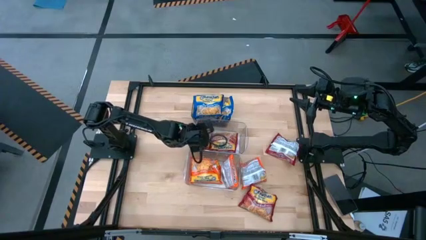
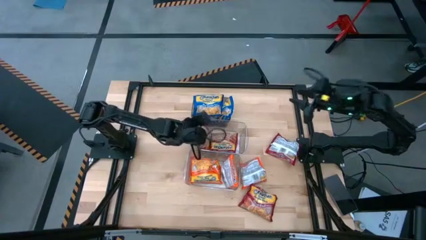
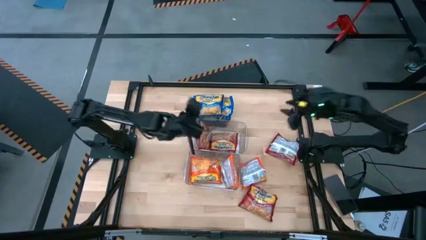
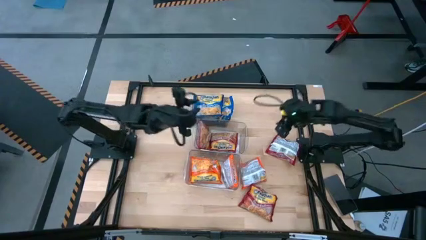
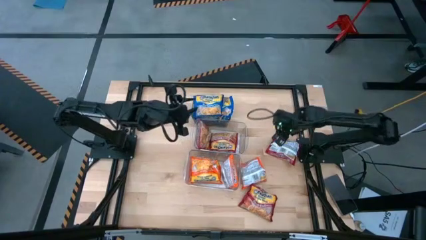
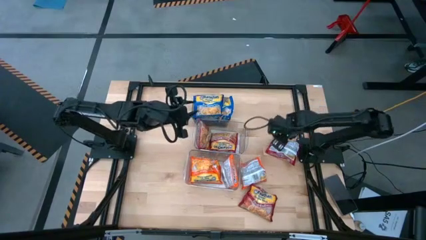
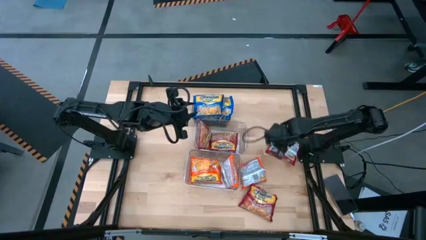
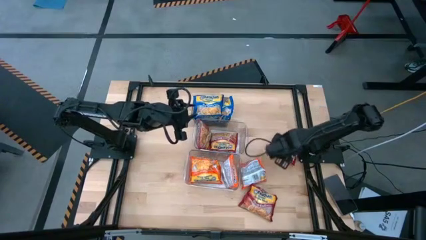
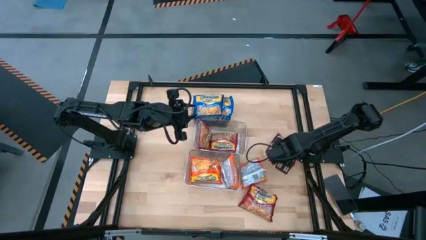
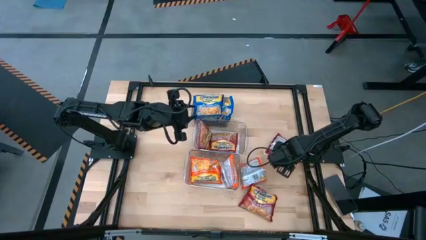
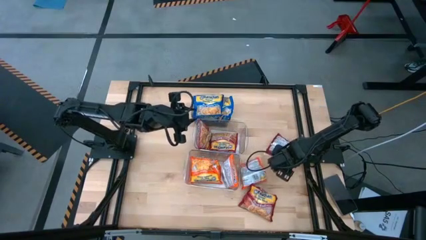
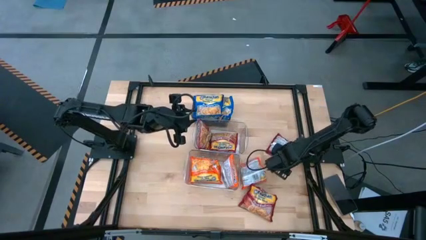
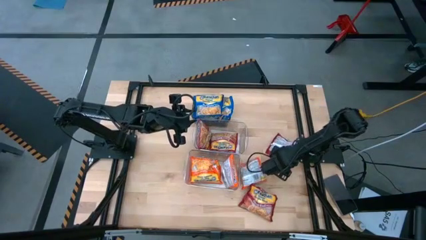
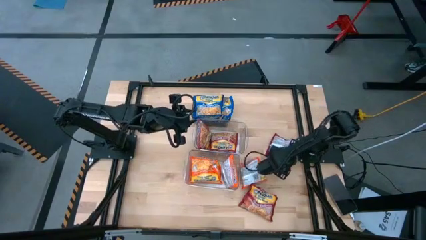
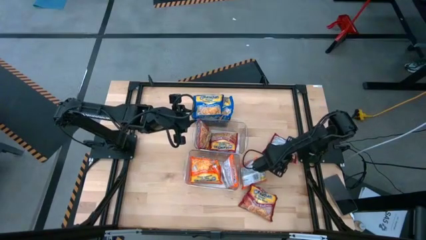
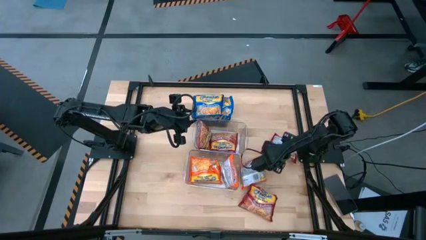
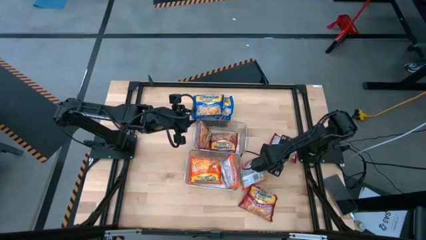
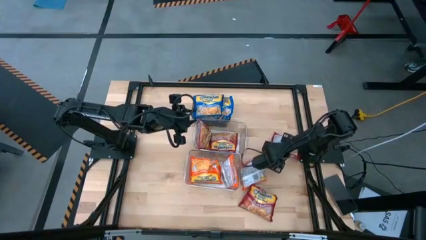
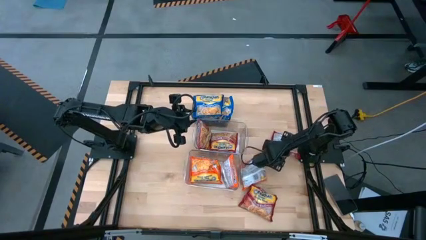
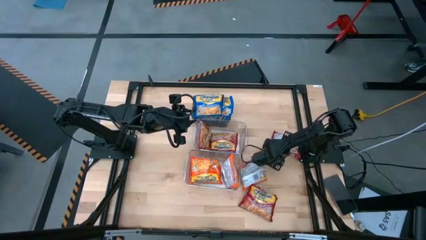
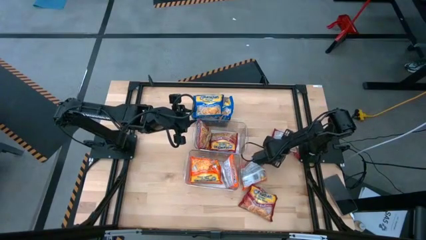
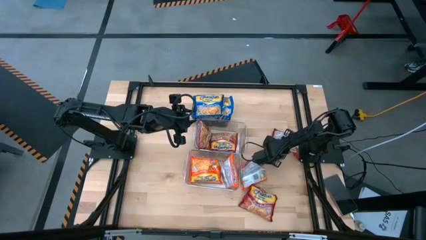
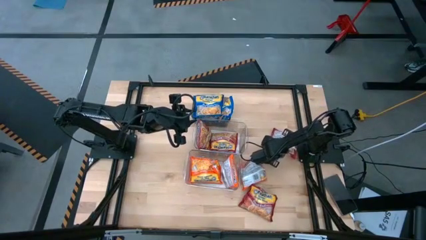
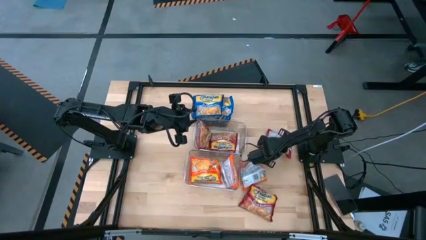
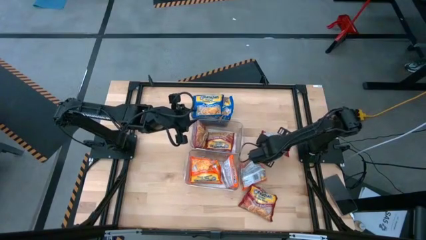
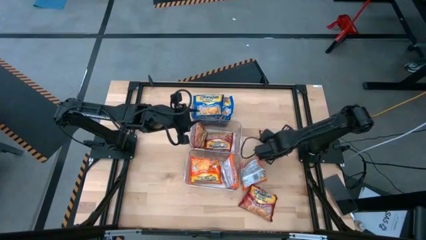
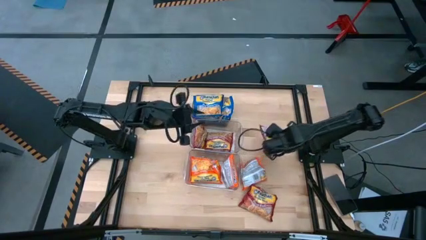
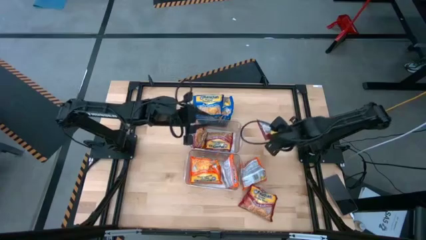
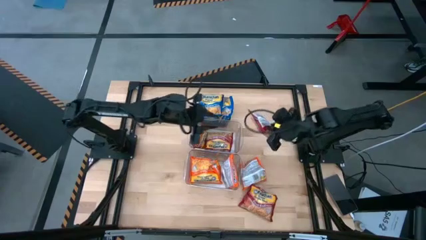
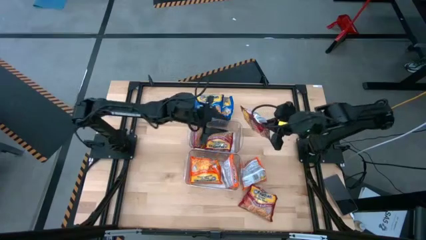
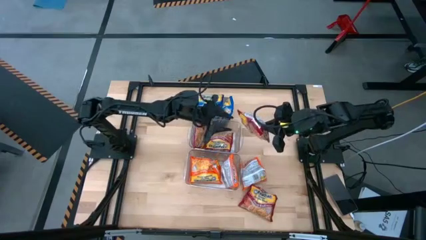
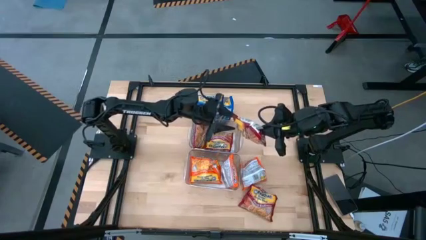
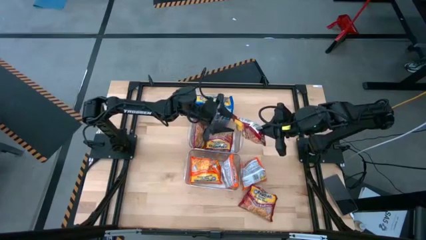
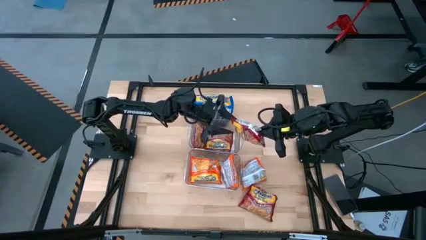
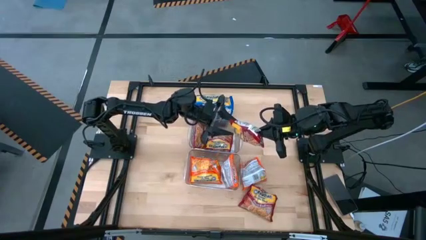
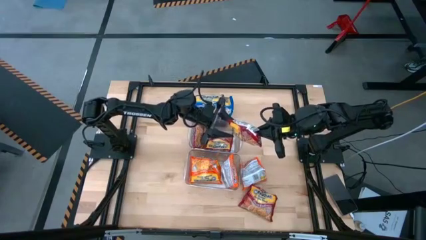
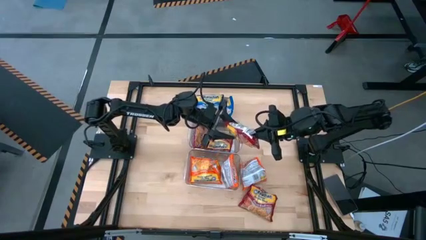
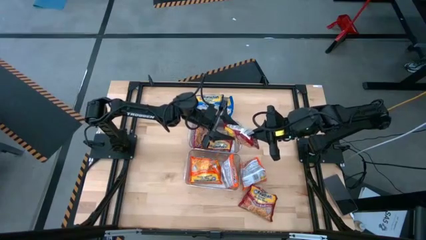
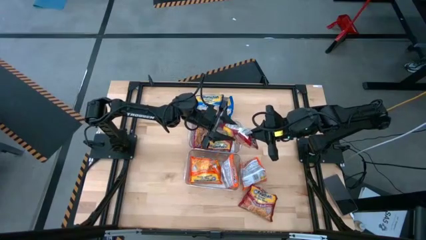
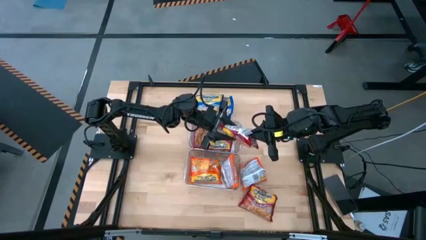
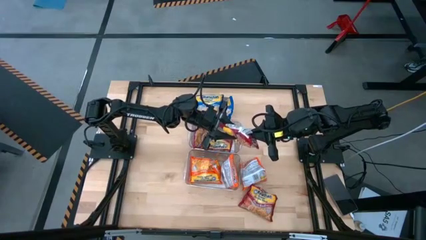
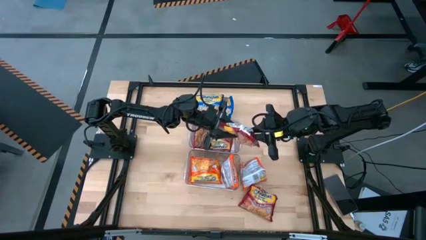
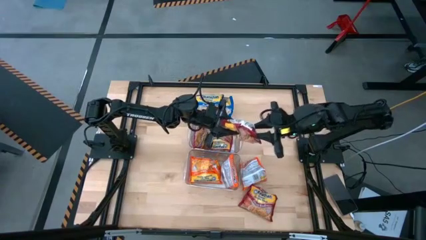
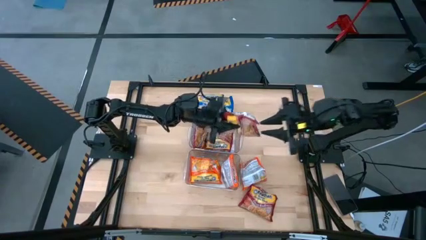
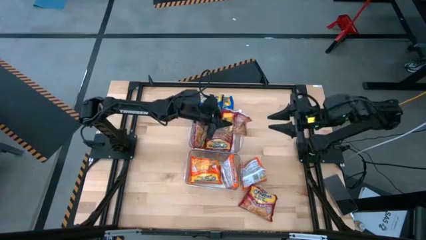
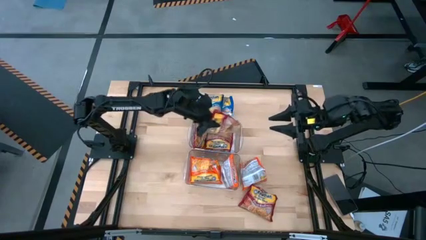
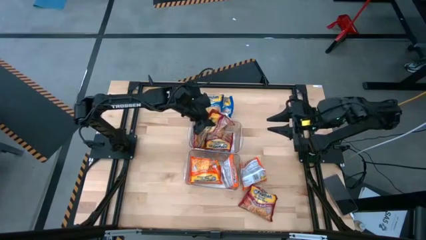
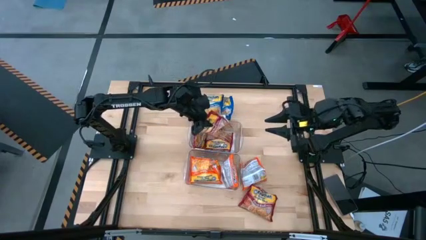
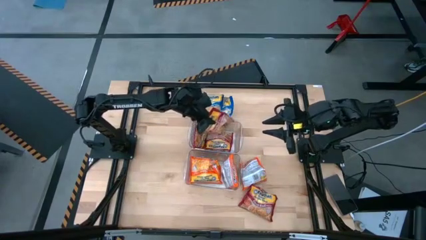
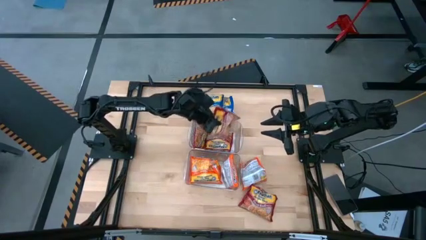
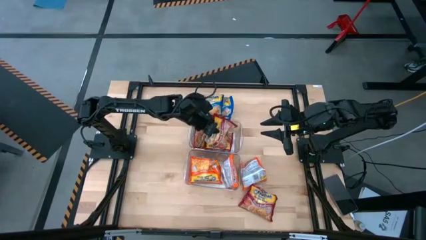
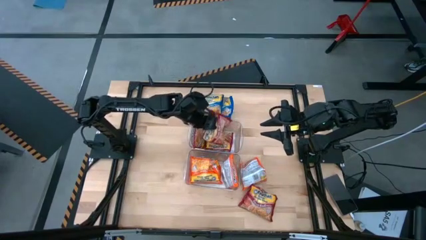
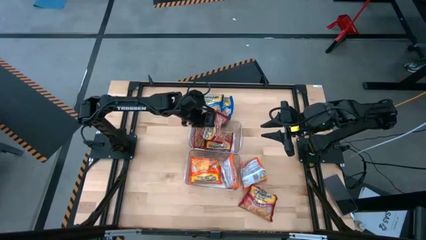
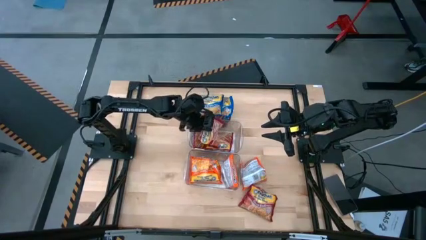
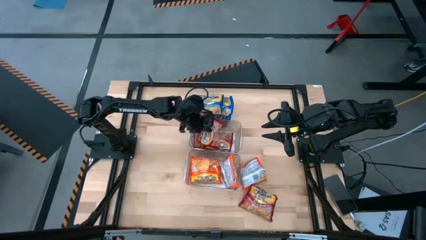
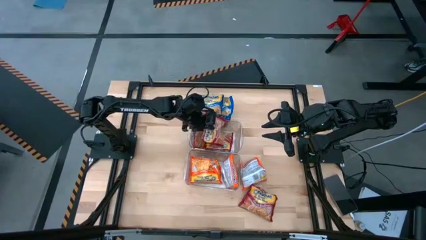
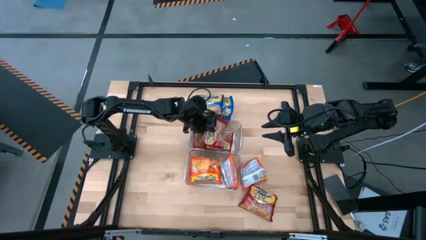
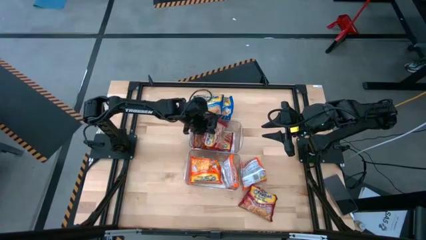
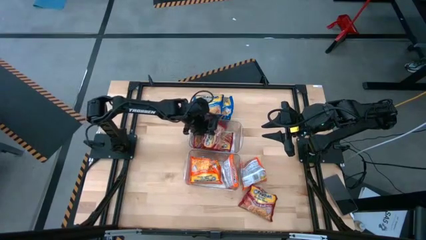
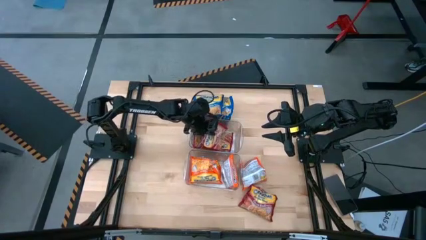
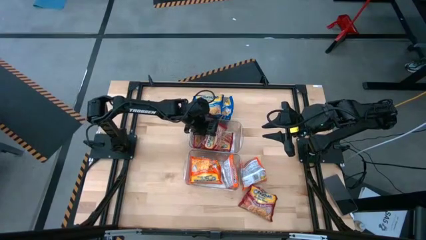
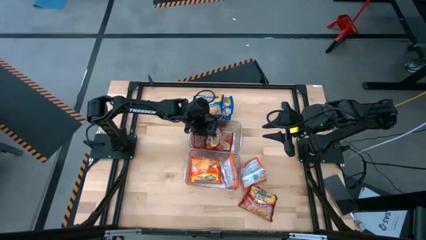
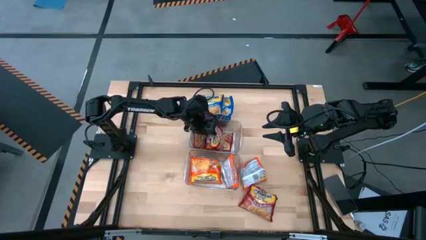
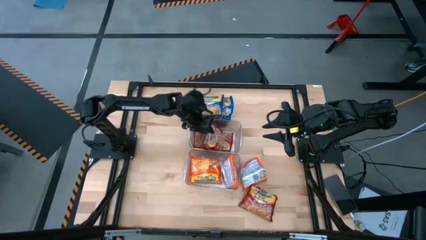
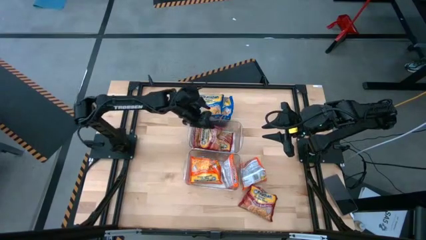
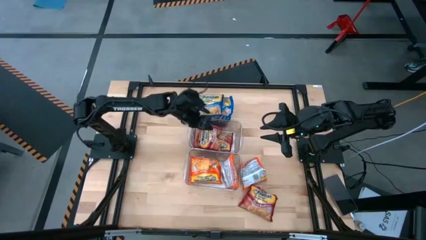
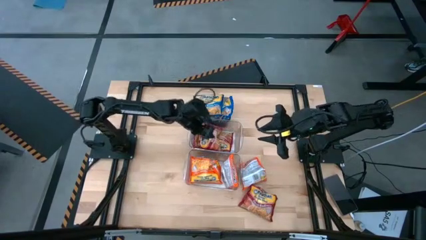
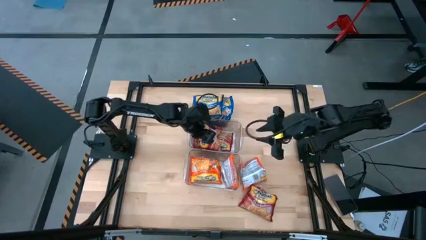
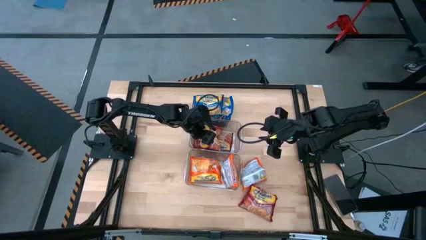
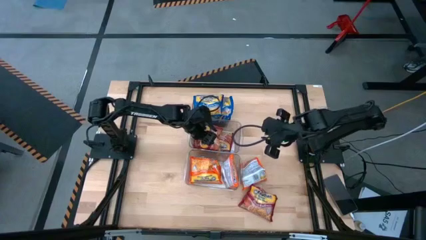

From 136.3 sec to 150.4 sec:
Task: Sort Maruchan noodles
Put the top red noodle pack into the top transparent bin
